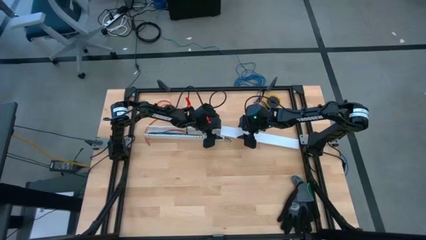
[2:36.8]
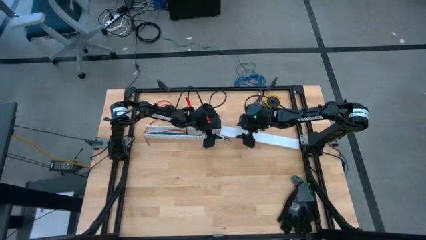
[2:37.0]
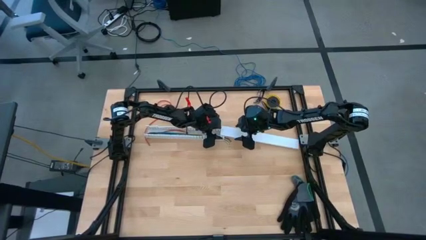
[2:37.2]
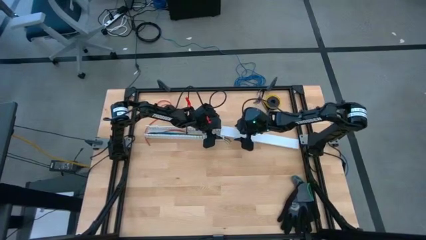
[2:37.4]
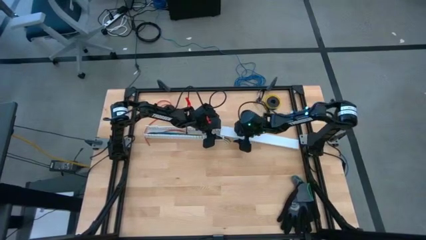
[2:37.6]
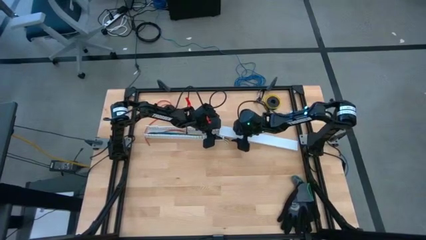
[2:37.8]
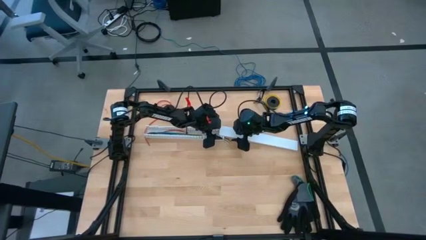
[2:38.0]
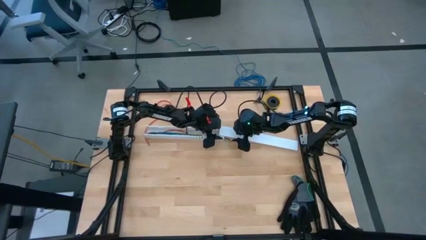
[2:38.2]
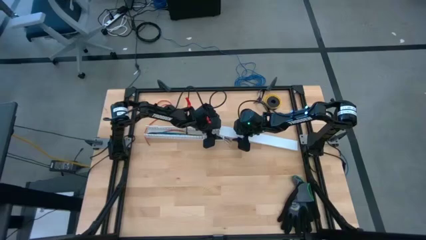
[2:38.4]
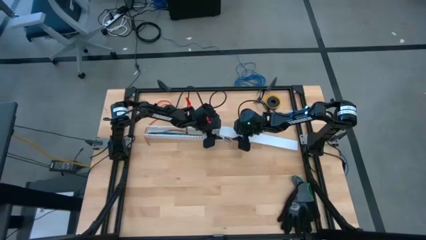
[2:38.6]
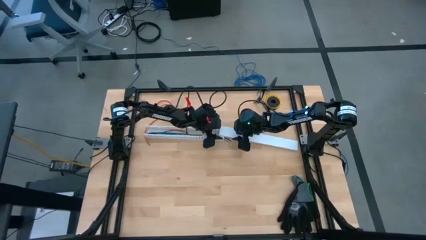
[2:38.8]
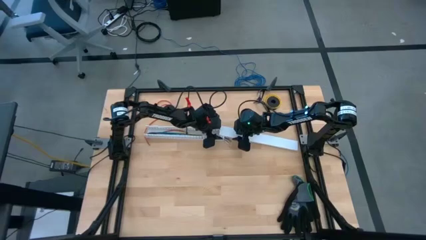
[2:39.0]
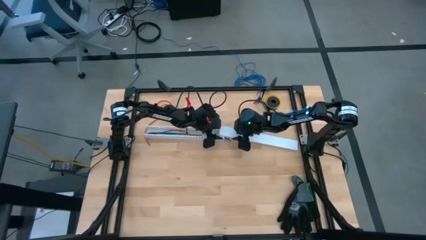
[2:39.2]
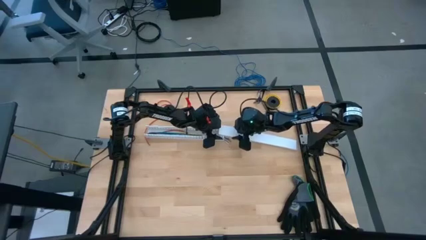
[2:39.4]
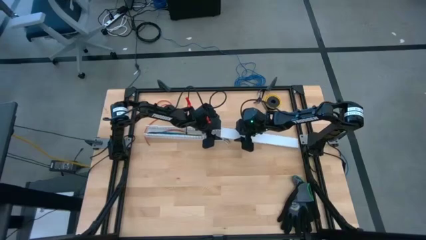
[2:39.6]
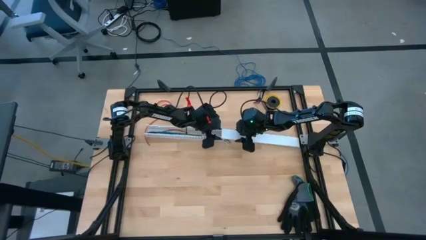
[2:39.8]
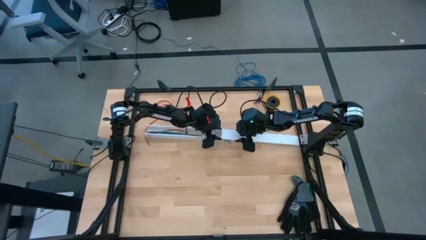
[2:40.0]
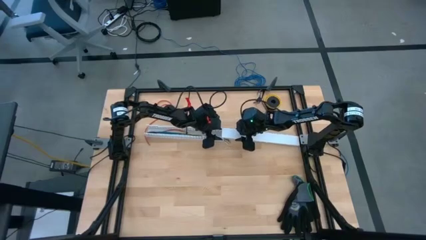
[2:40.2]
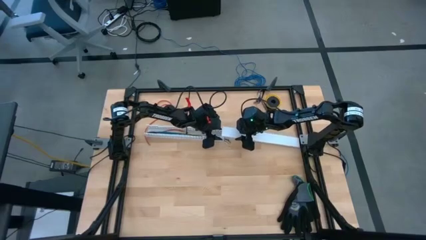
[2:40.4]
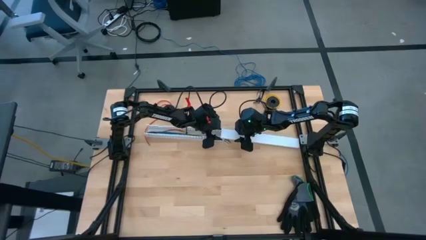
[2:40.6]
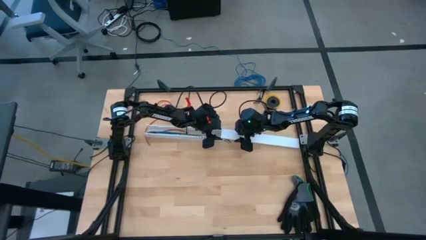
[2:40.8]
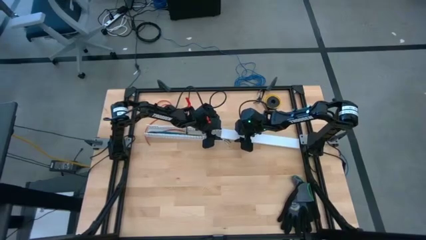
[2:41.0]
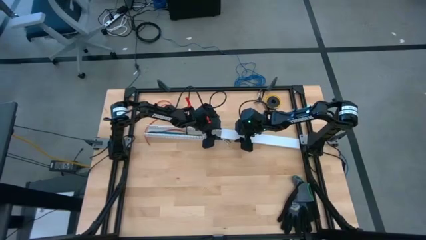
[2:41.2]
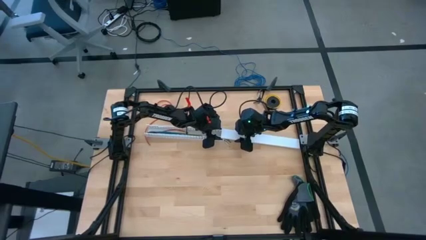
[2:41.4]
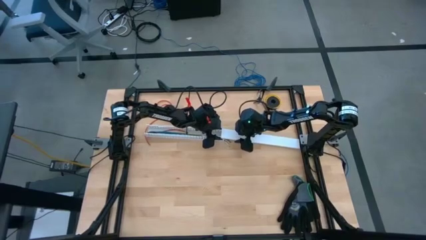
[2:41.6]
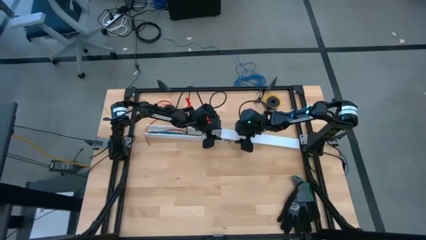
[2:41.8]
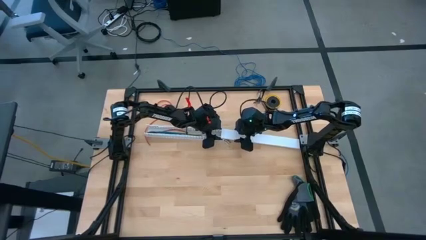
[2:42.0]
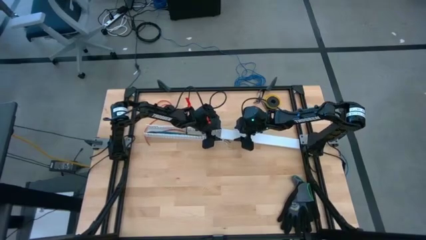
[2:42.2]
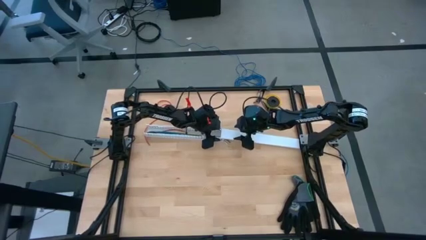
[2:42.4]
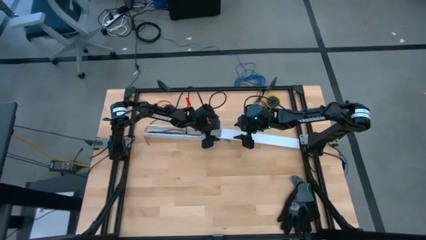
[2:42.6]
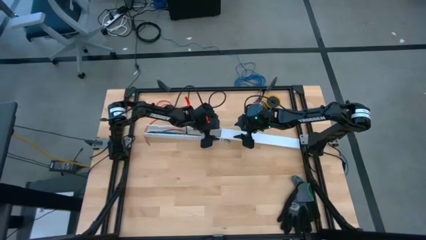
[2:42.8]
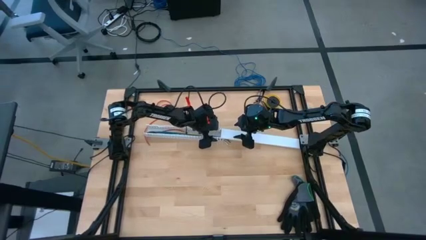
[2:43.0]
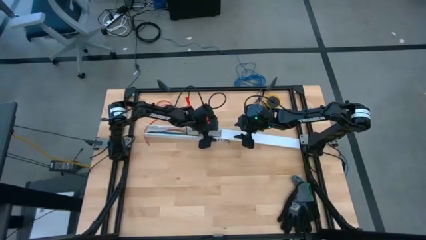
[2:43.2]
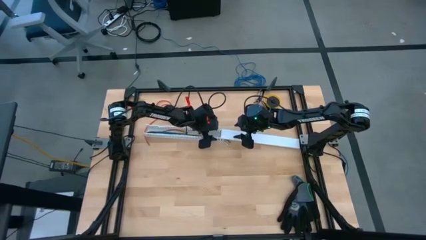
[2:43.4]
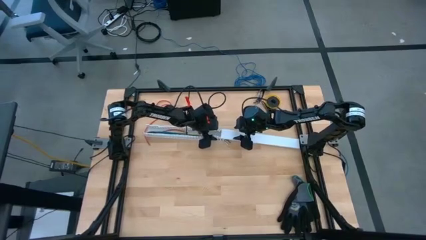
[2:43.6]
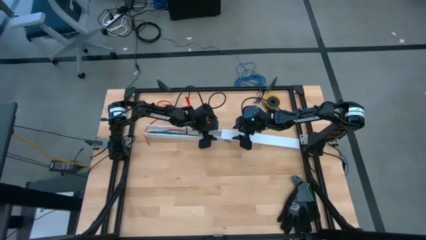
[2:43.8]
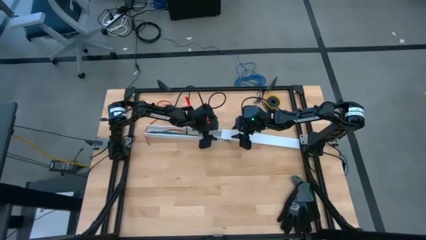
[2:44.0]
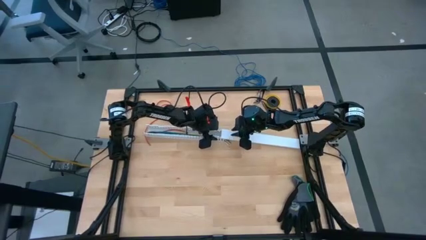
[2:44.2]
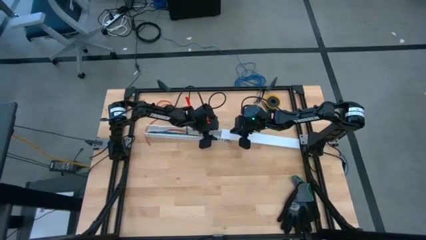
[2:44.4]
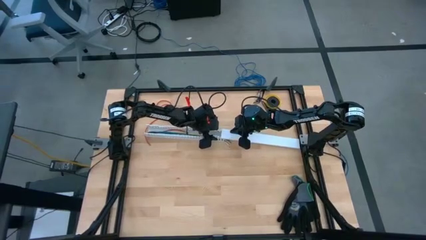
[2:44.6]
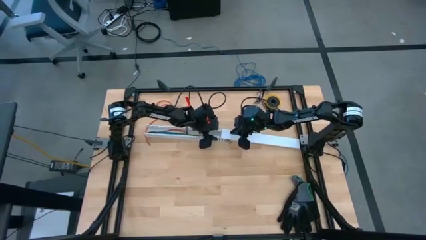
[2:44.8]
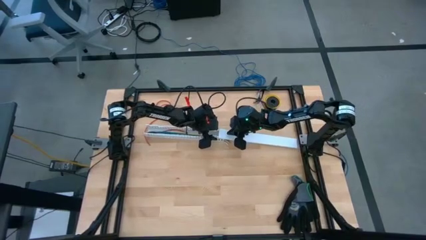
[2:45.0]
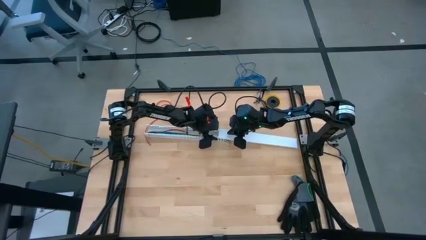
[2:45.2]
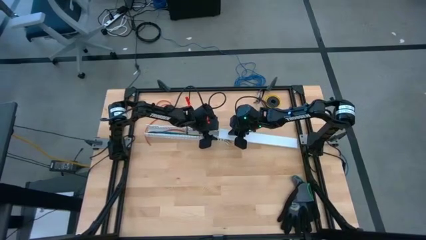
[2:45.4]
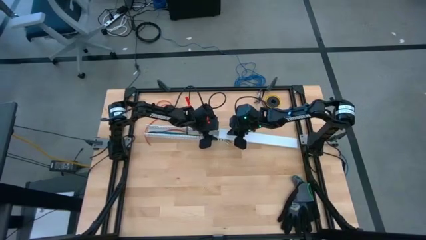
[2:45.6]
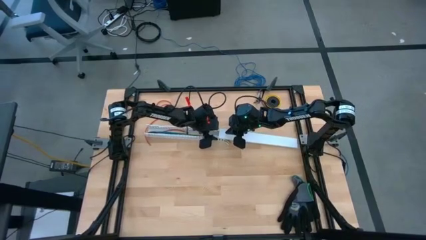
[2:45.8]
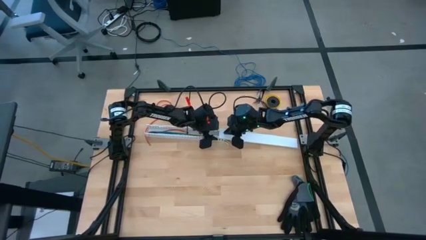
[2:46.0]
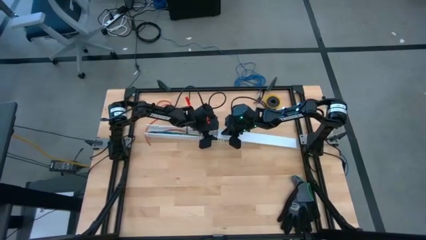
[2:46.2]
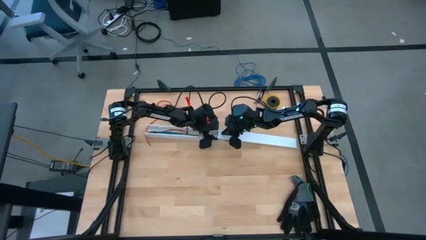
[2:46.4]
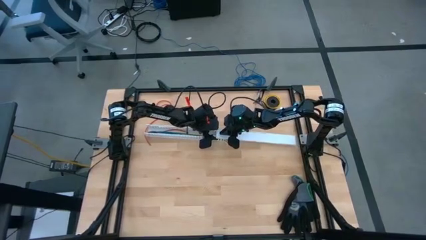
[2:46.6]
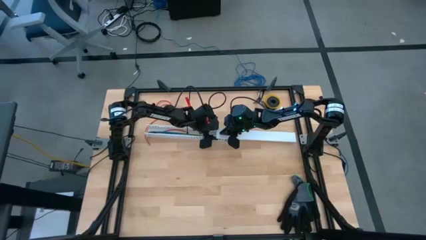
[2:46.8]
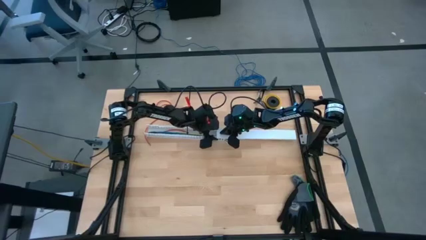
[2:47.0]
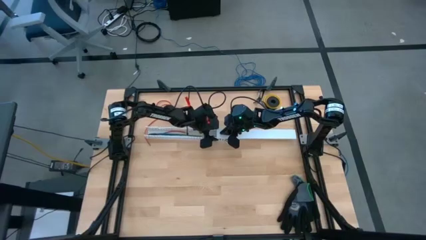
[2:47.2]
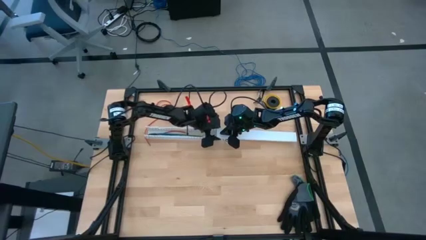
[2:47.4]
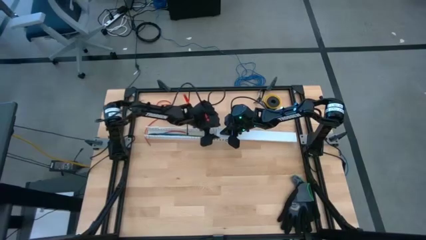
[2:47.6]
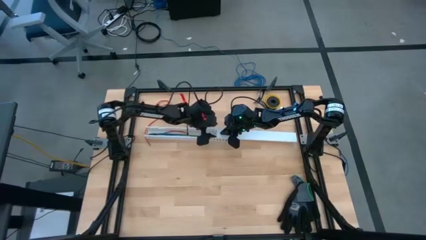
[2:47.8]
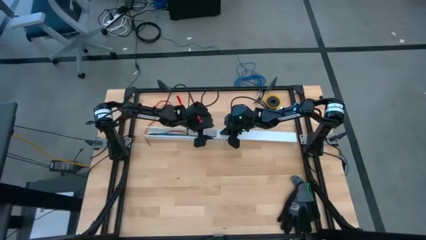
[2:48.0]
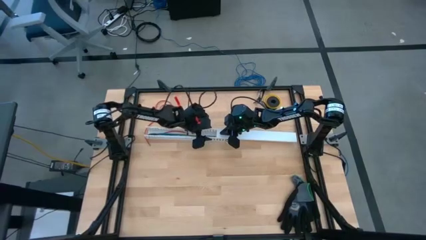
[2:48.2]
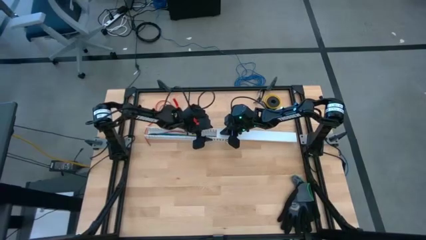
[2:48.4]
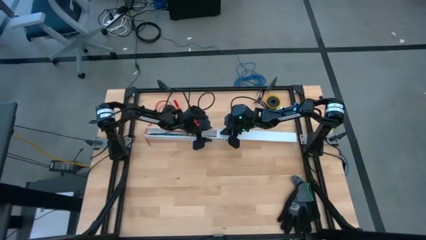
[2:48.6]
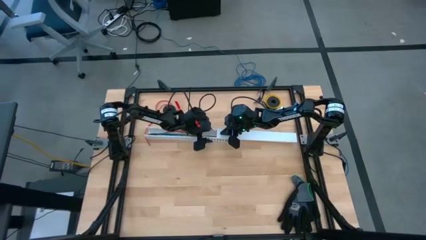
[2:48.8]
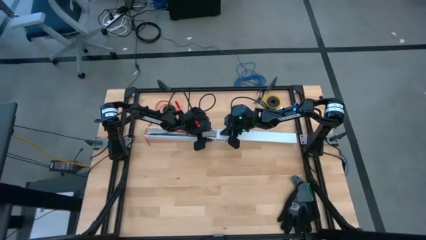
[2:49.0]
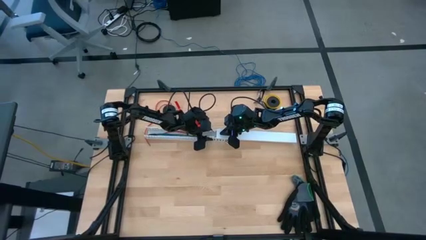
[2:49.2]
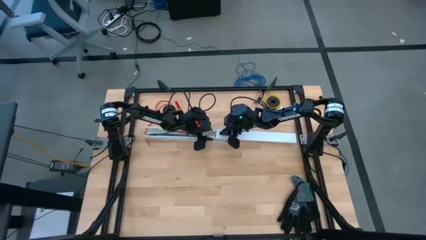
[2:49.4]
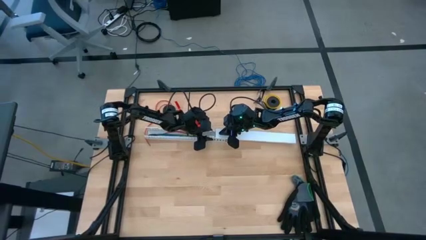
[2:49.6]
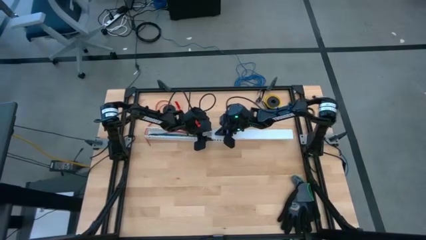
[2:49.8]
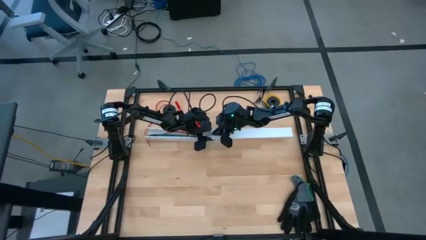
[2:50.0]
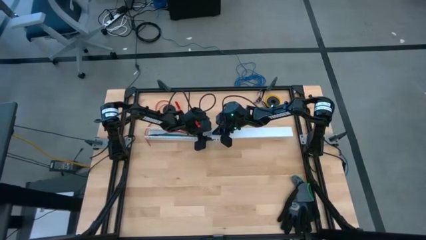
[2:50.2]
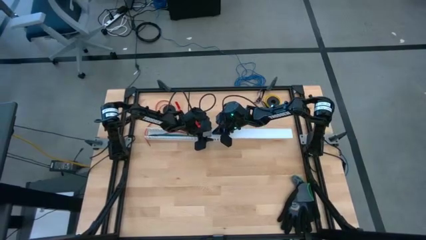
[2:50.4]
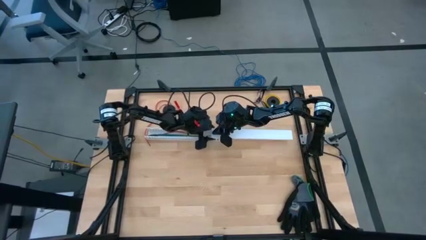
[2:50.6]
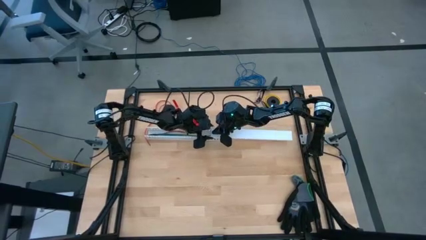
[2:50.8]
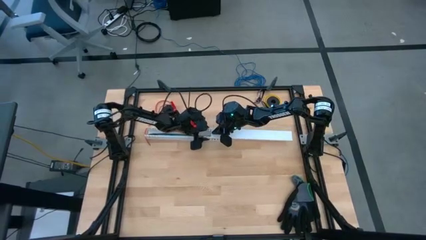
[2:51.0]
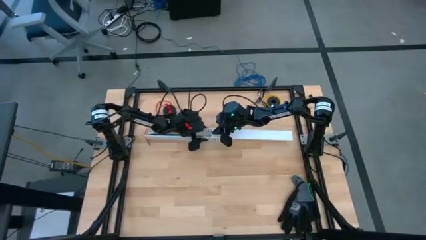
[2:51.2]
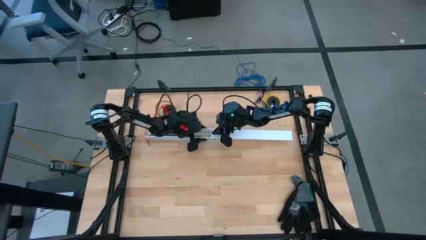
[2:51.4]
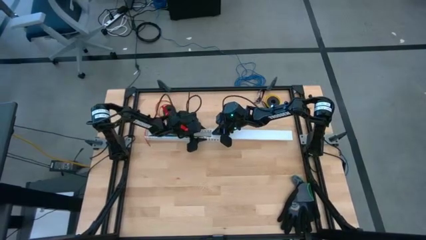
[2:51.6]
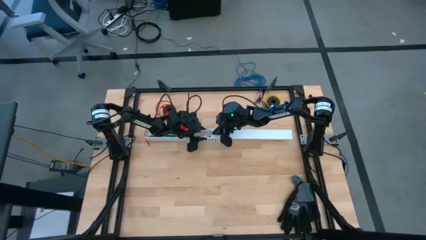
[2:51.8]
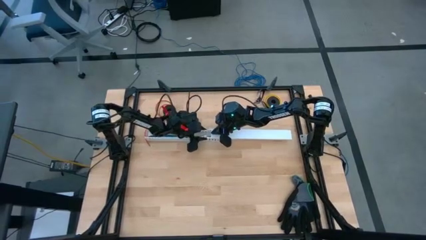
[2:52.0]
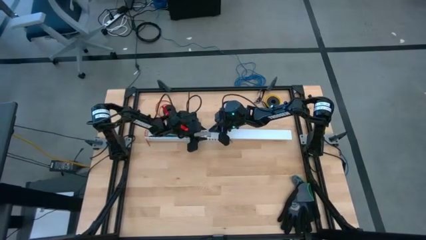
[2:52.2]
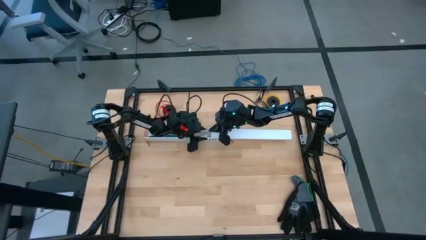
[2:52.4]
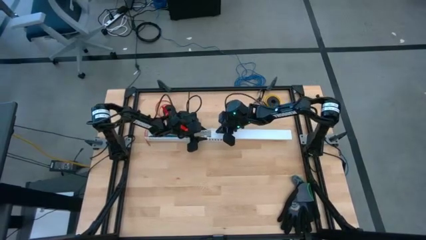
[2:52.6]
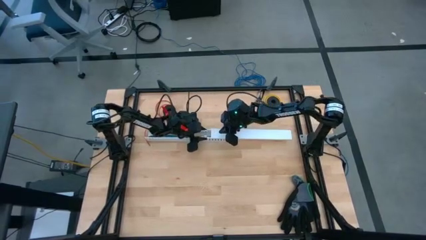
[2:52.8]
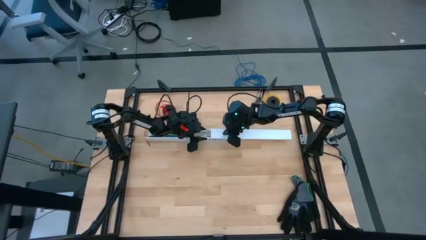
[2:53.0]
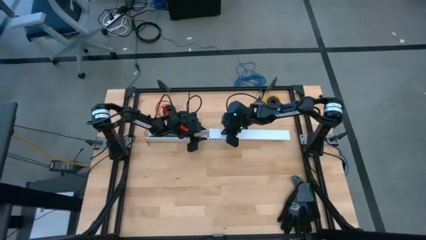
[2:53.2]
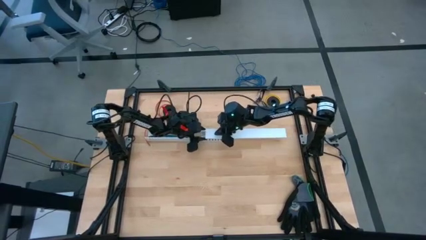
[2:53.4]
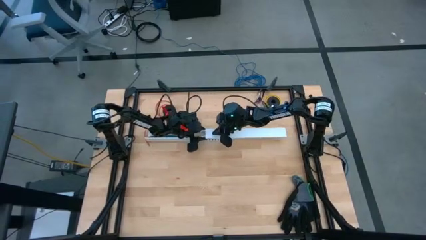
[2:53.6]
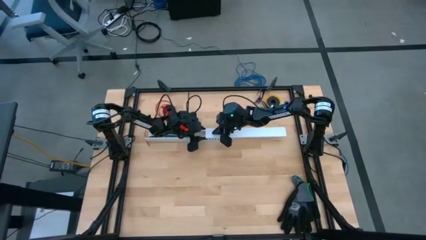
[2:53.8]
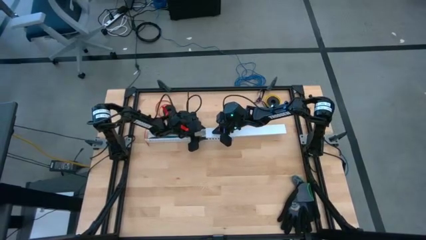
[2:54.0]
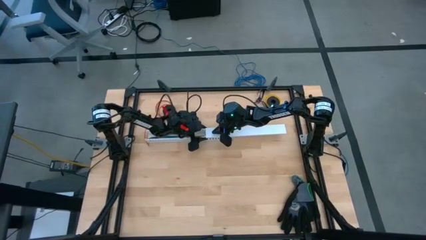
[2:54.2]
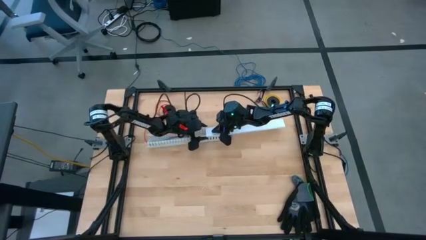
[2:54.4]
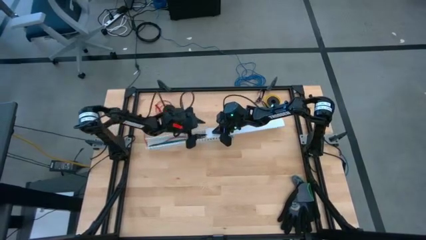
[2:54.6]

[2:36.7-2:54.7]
Task: Ziptie cables
Close the white cable duct
